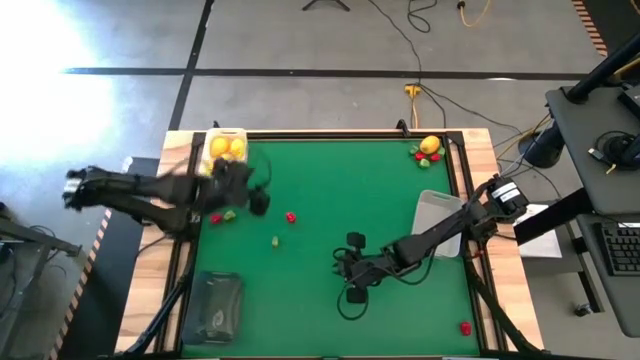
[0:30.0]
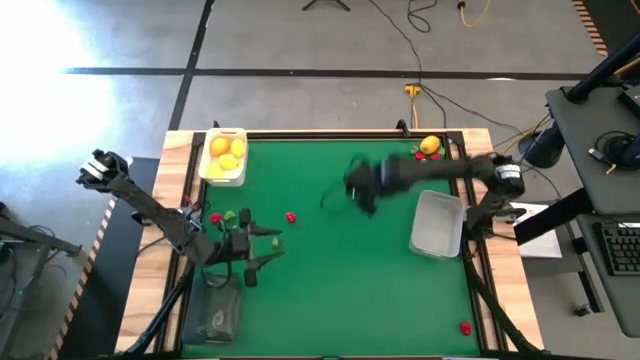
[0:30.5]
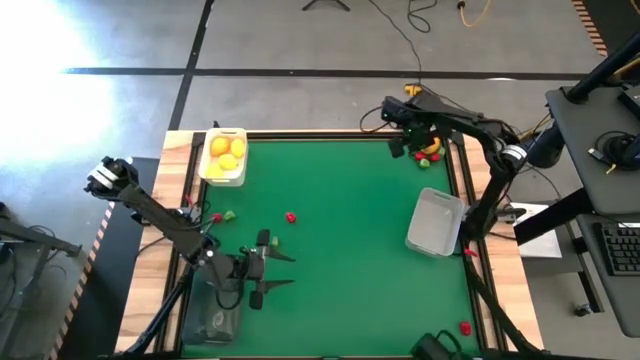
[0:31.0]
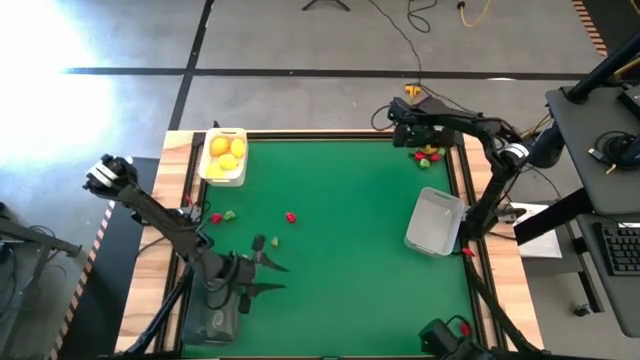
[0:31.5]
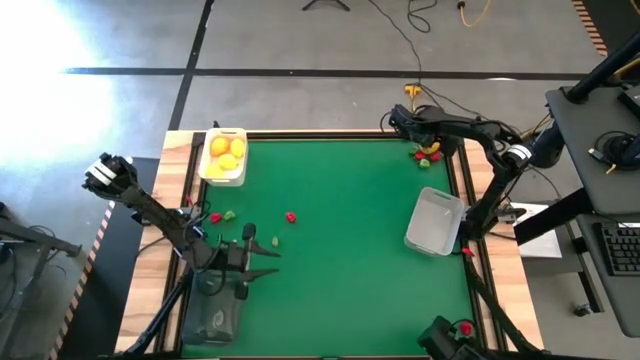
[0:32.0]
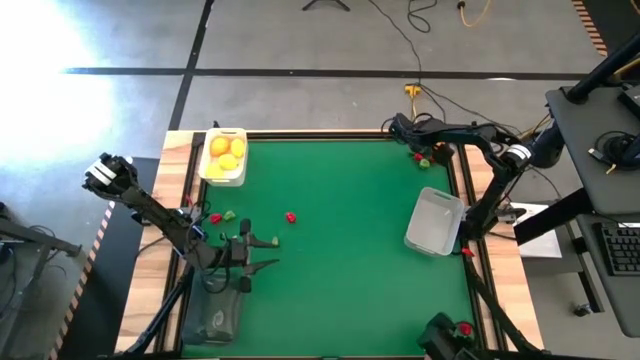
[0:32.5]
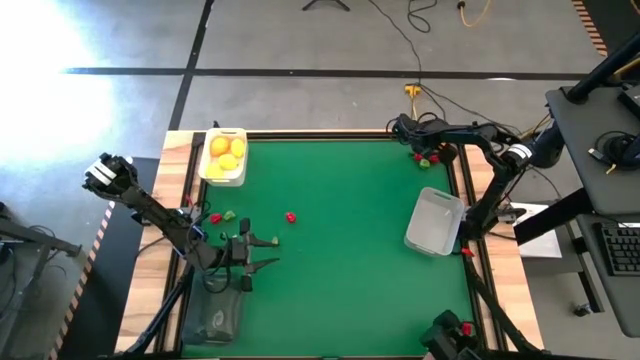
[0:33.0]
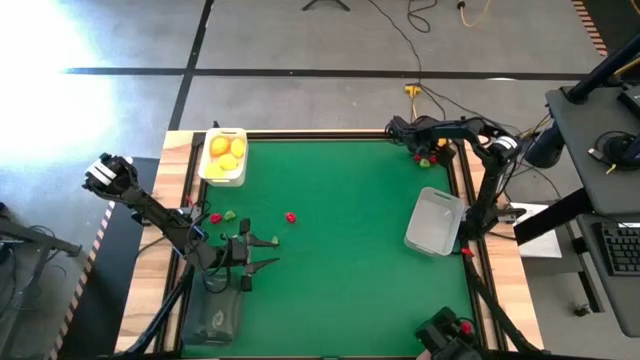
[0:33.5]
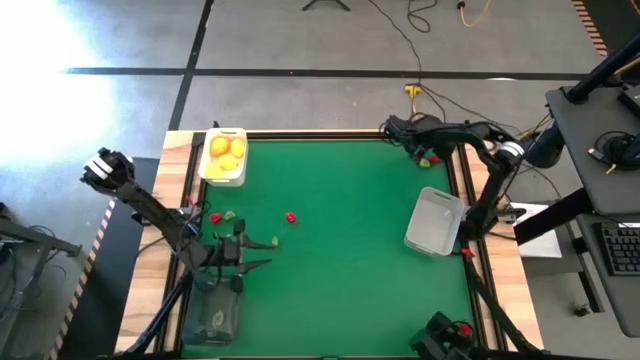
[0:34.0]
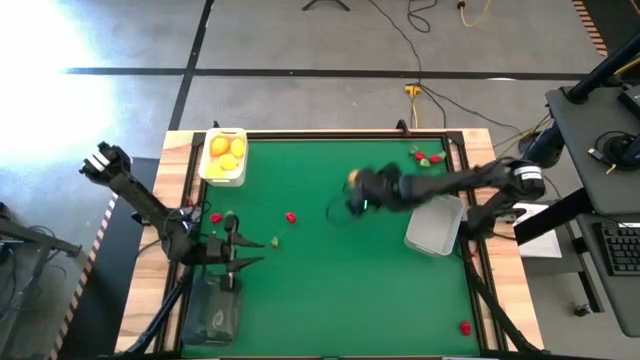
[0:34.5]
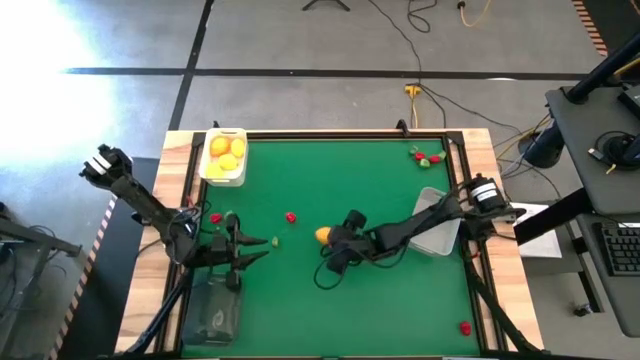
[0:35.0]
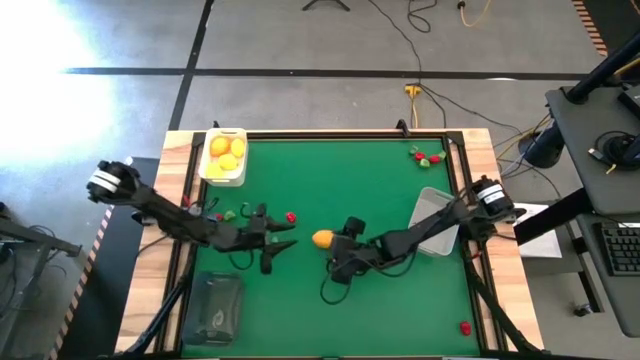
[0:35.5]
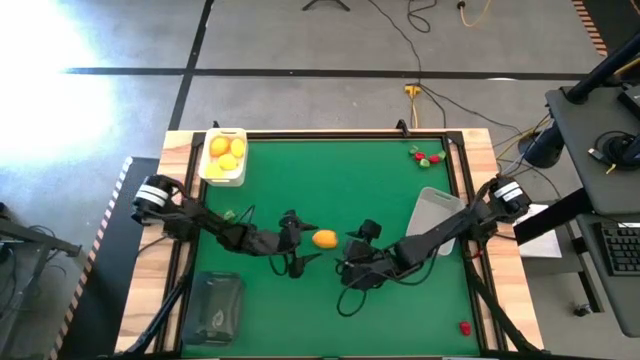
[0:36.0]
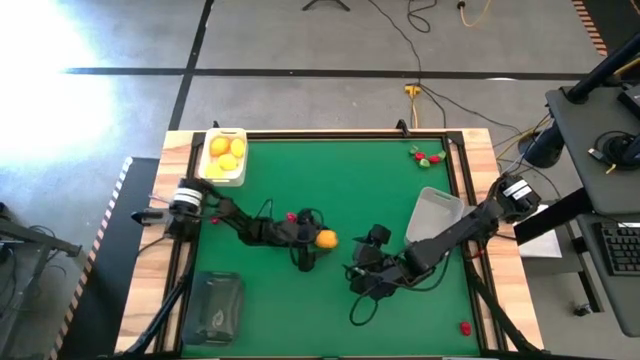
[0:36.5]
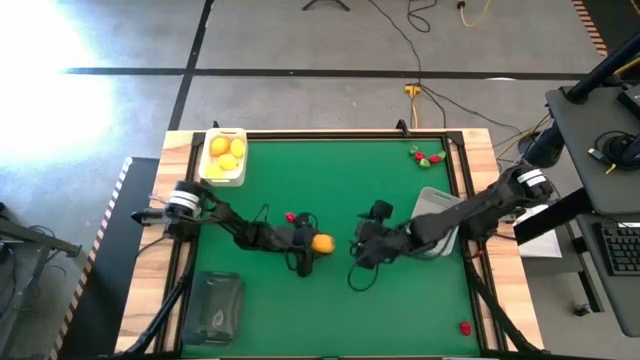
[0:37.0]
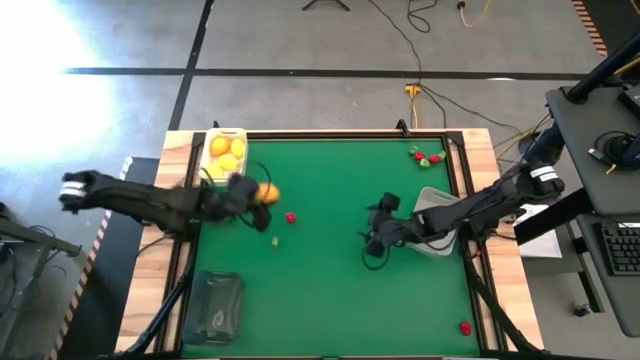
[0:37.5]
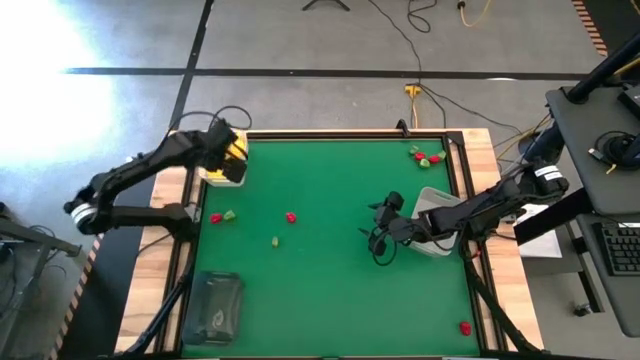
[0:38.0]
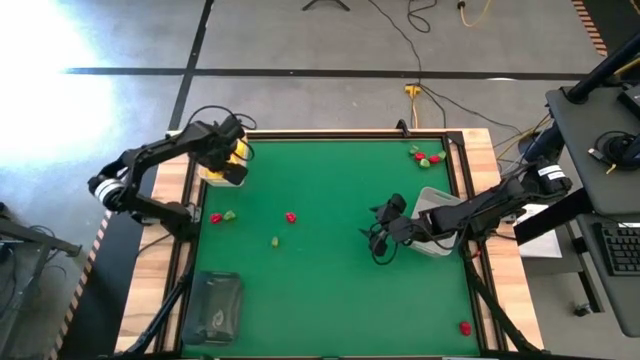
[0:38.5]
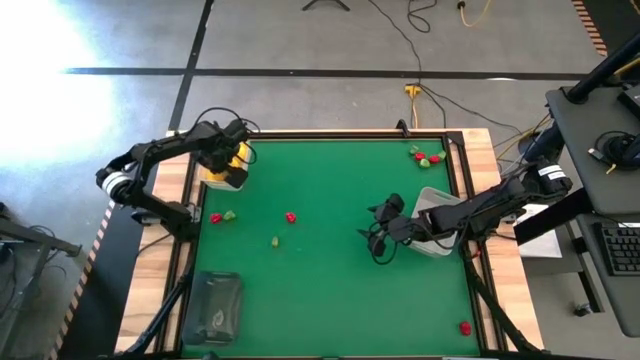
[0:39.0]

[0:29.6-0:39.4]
Task: Sort produce into baskets
Put the yellow lemon into the white bin

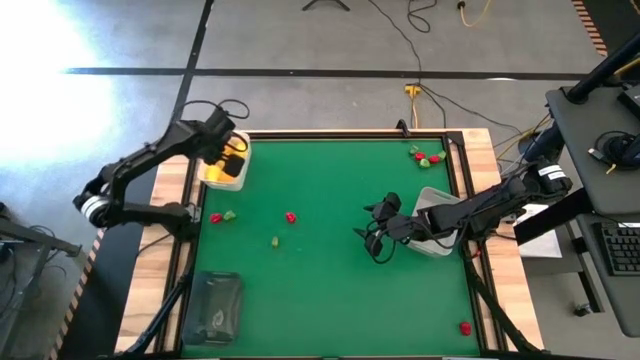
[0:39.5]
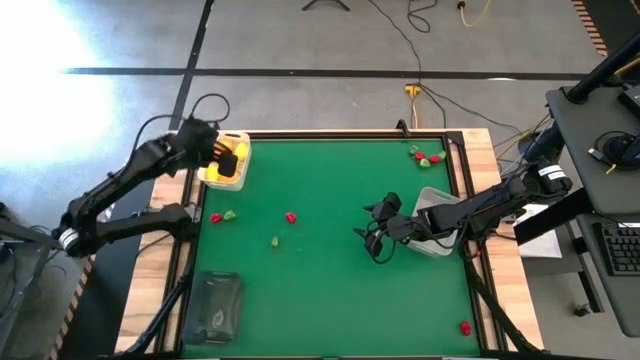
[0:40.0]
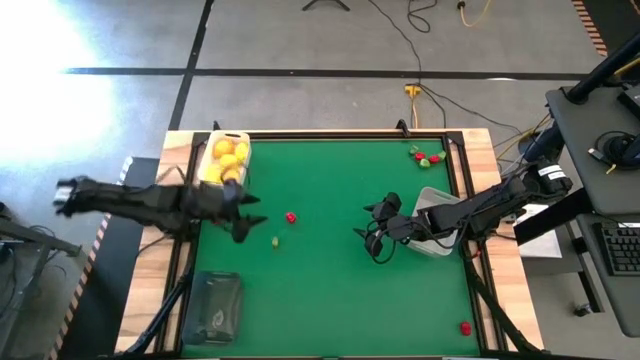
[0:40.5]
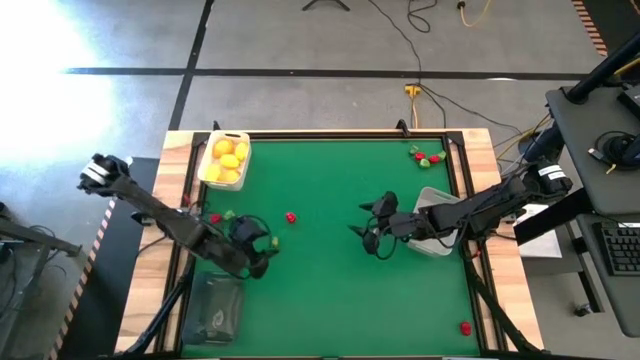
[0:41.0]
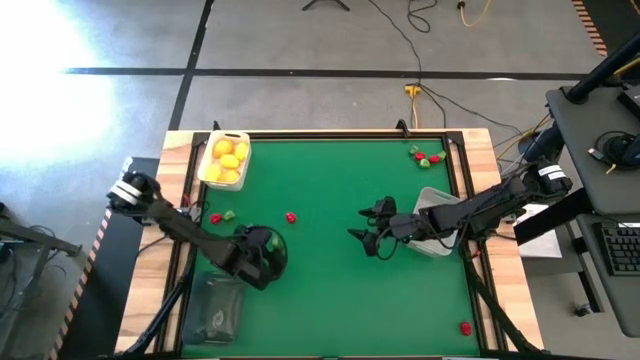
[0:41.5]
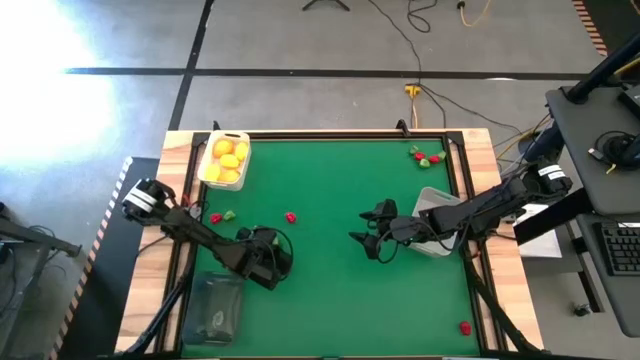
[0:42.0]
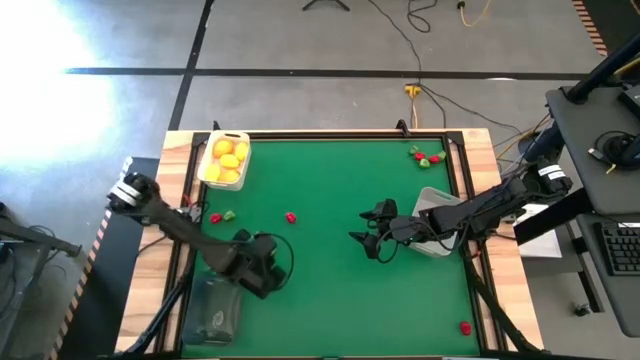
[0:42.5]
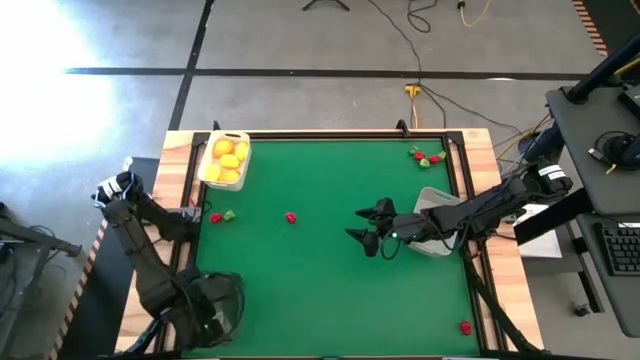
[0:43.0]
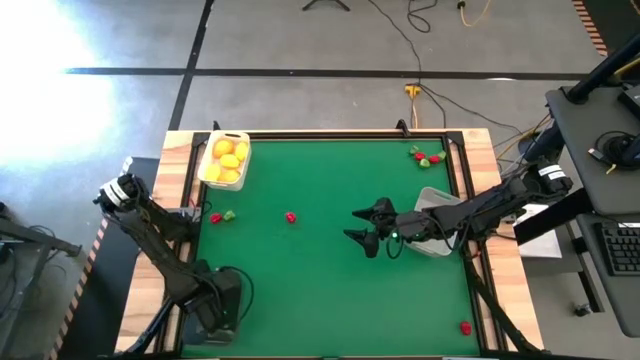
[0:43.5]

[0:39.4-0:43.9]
Put the green chili pepper into the black bin

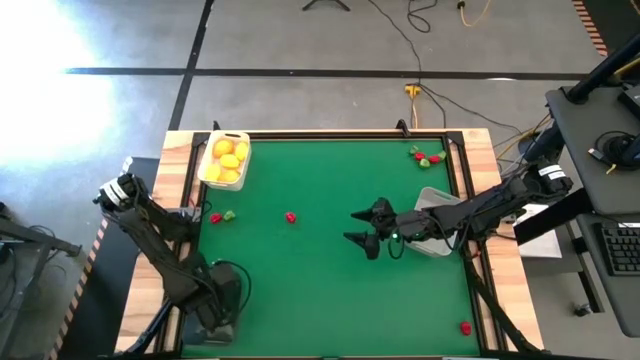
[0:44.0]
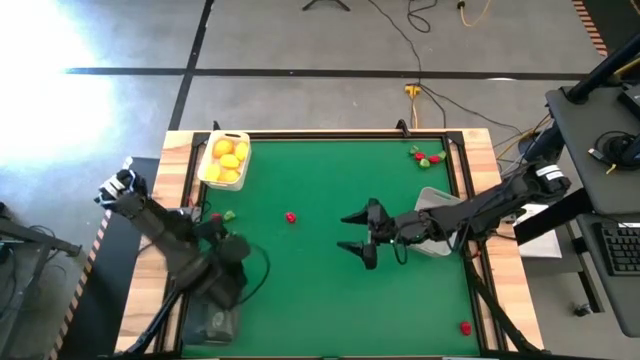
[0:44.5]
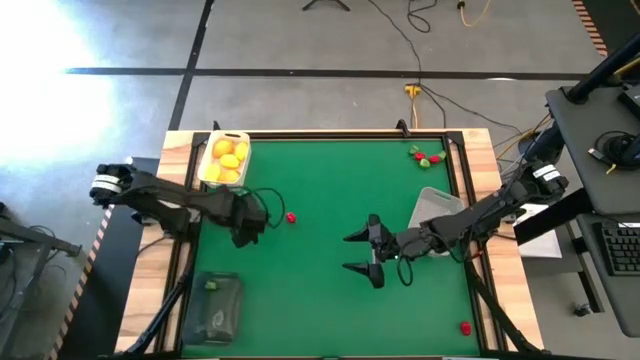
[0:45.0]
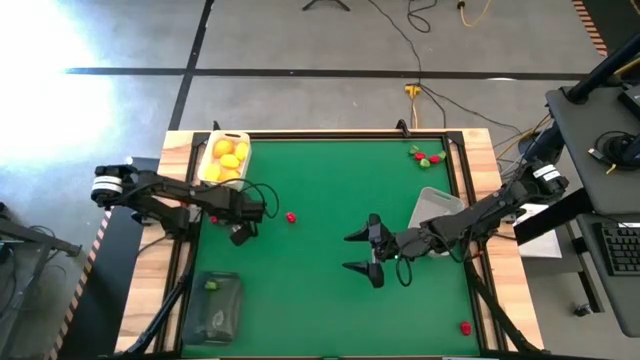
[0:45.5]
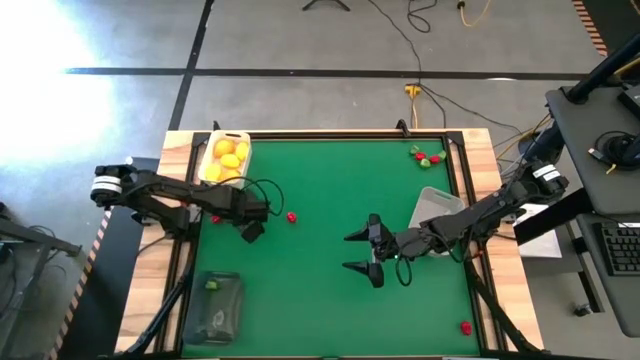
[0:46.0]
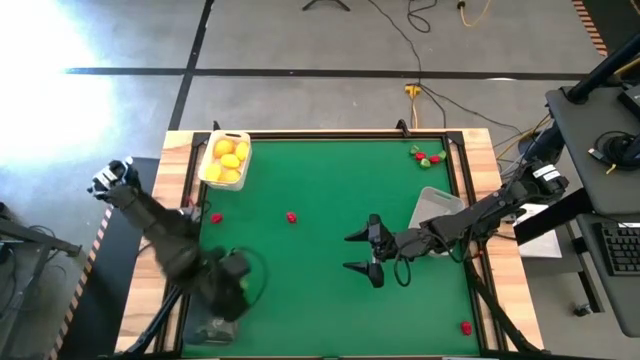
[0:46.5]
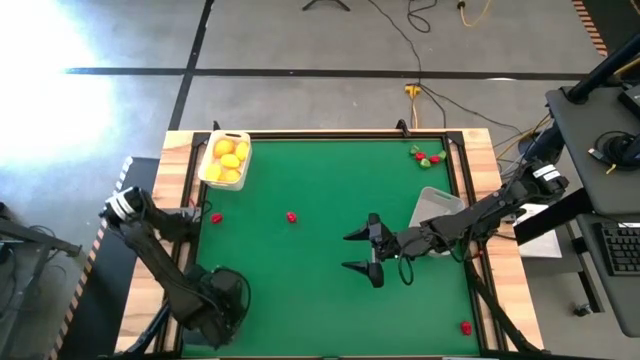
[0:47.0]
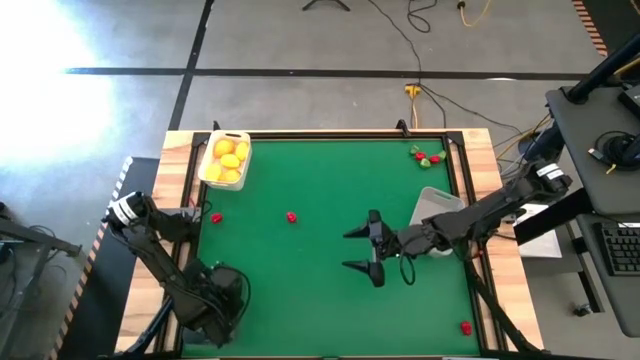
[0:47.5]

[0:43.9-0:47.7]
Put the green chili pepper into the black bin

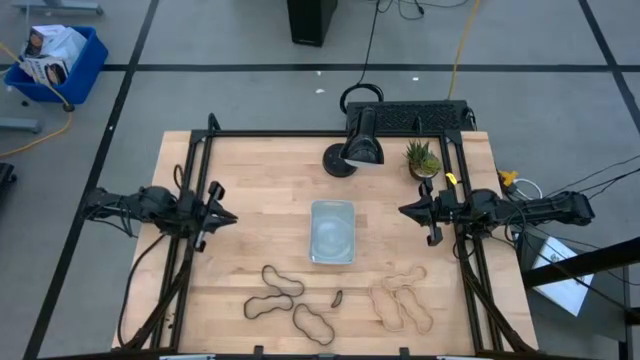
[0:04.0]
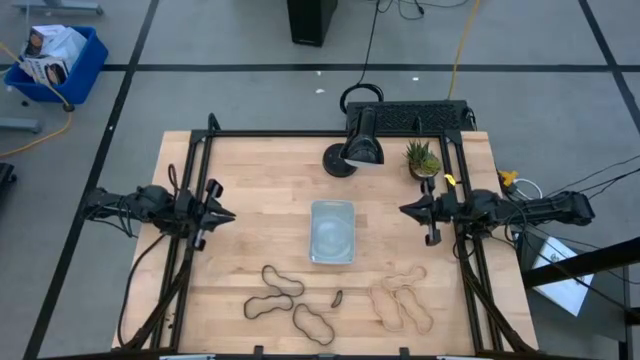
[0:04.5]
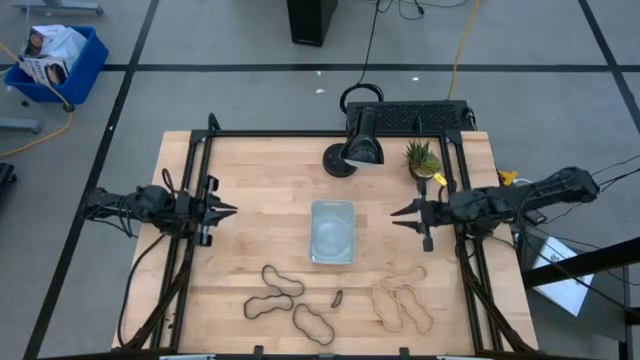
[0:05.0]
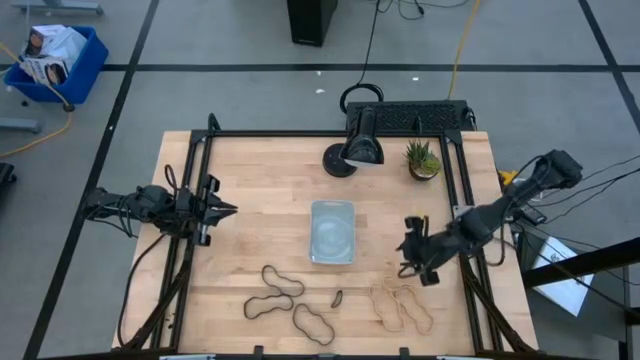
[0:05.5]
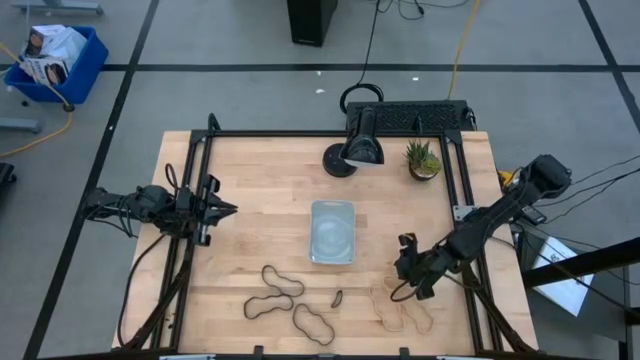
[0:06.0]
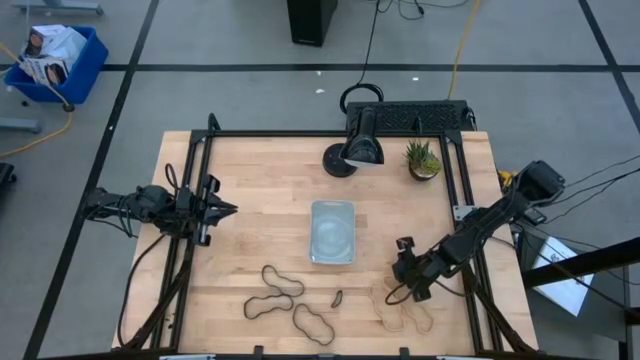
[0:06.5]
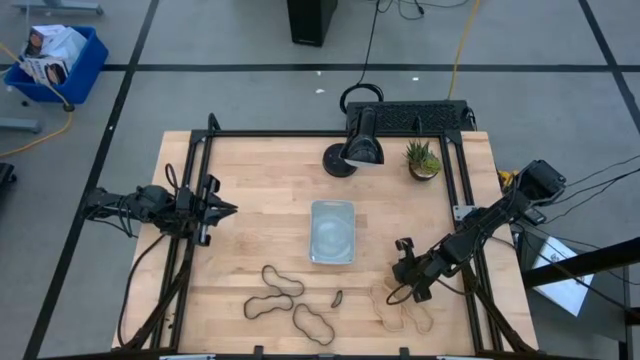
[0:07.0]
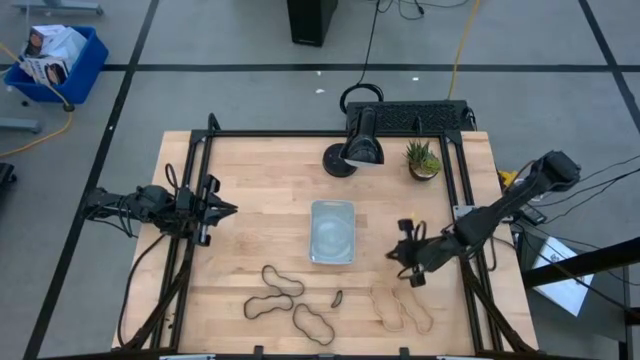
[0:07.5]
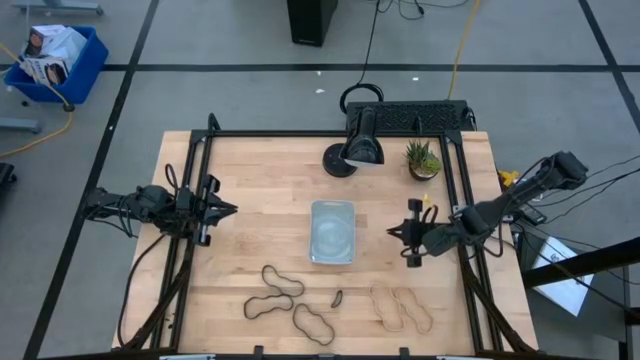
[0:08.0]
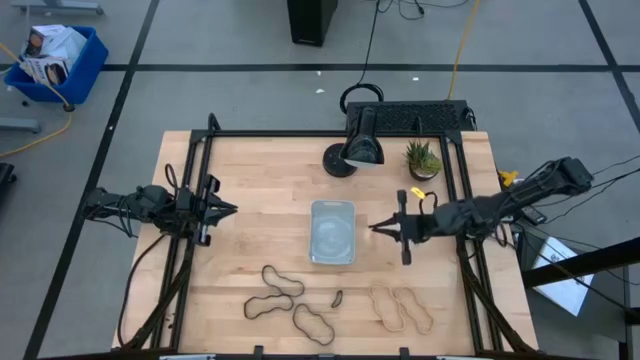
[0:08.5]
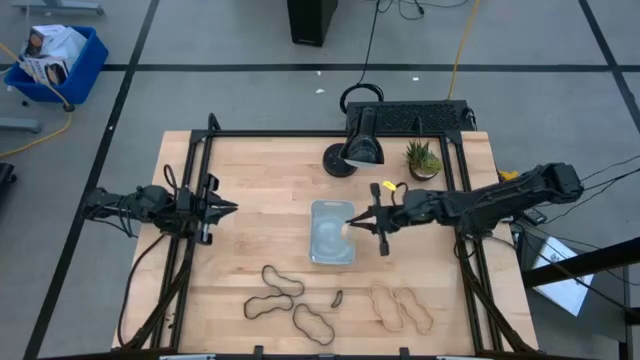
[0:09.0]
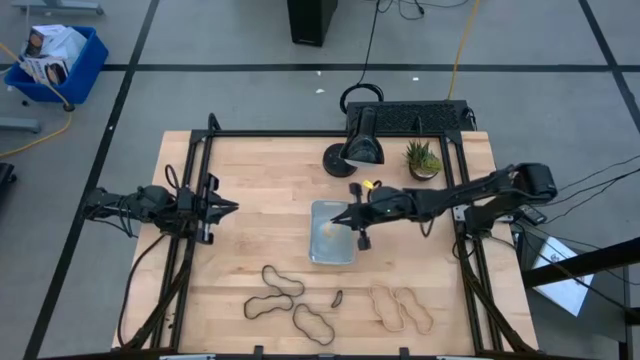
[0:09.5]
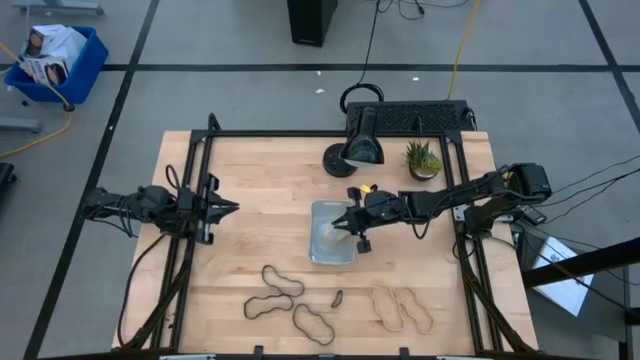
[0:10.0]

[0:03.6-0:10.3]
Task: Pick and place rubber bands into bin
Put the top brown rubber band into the gray bin
